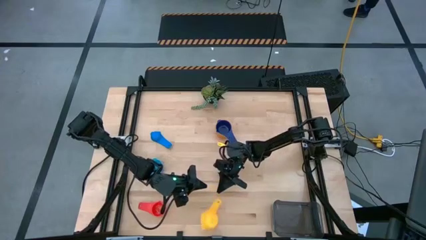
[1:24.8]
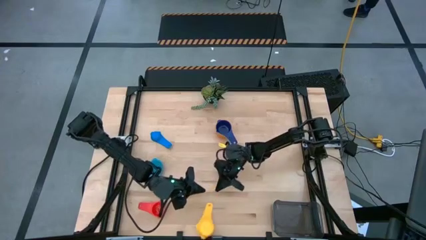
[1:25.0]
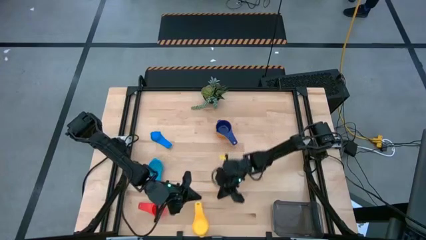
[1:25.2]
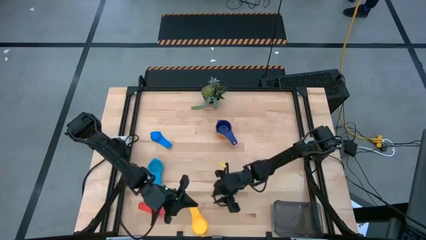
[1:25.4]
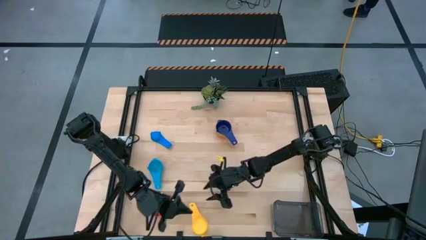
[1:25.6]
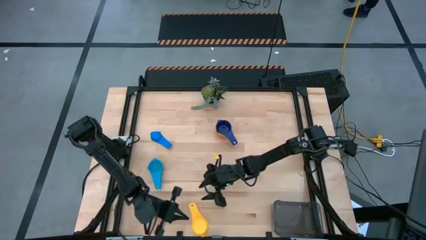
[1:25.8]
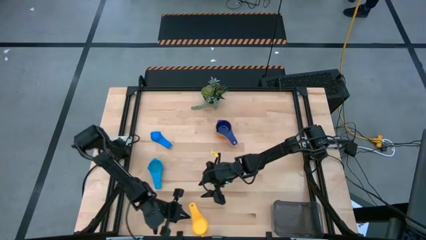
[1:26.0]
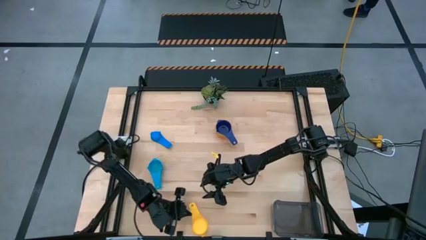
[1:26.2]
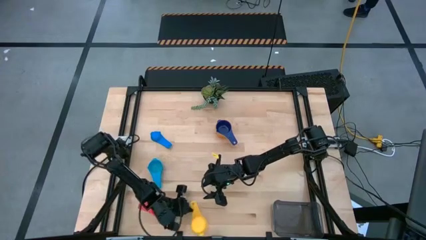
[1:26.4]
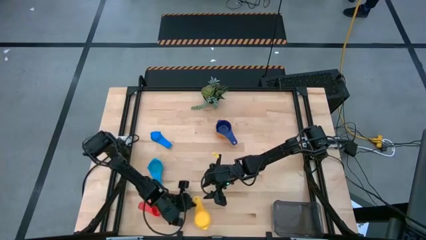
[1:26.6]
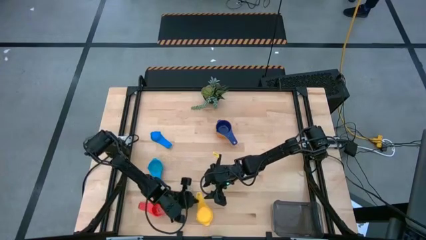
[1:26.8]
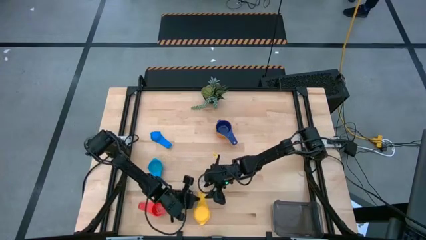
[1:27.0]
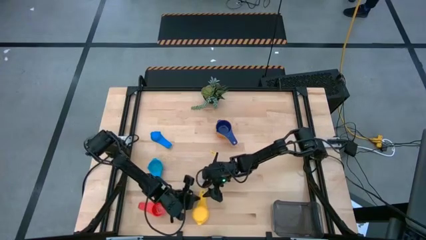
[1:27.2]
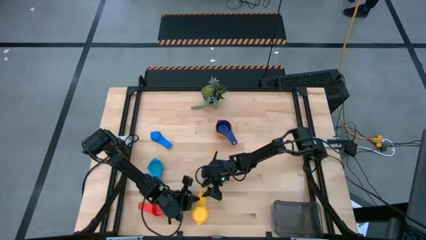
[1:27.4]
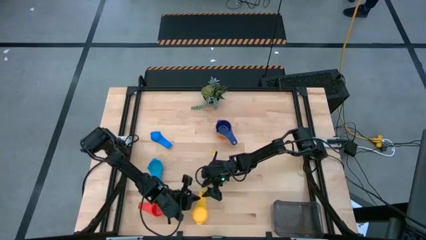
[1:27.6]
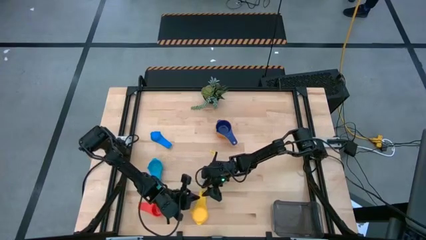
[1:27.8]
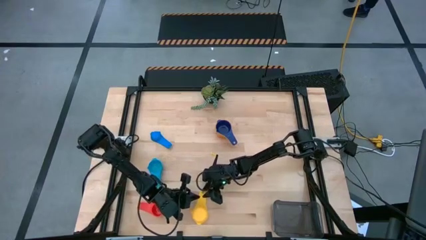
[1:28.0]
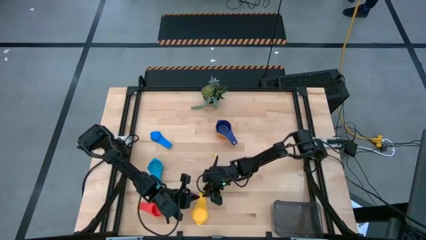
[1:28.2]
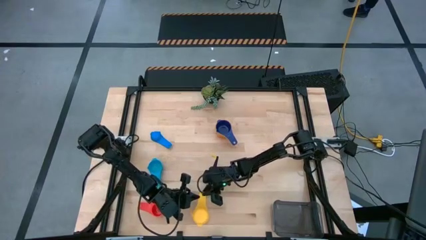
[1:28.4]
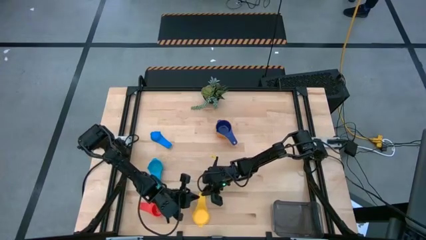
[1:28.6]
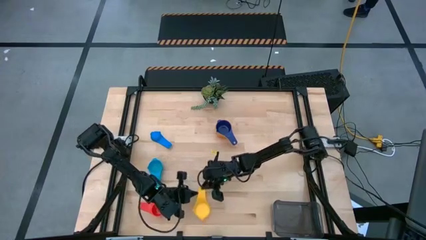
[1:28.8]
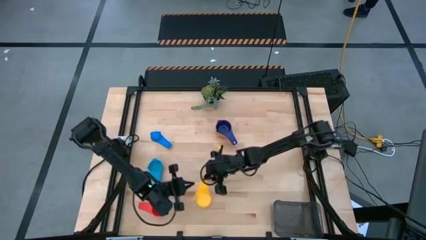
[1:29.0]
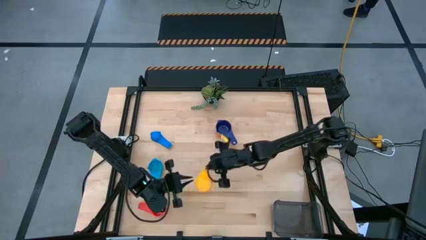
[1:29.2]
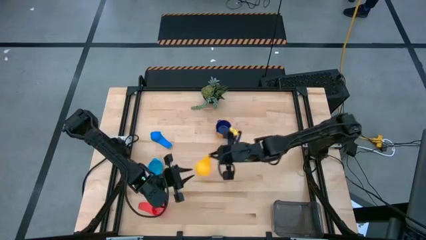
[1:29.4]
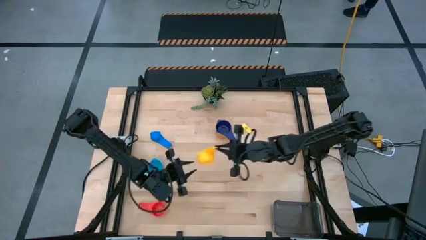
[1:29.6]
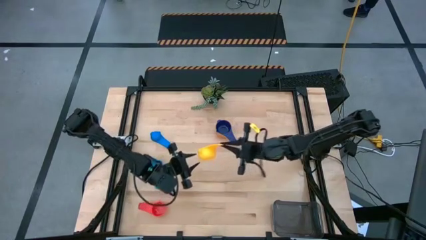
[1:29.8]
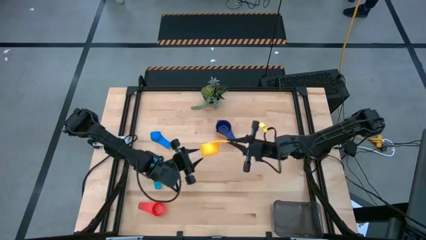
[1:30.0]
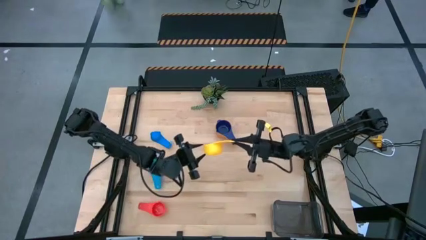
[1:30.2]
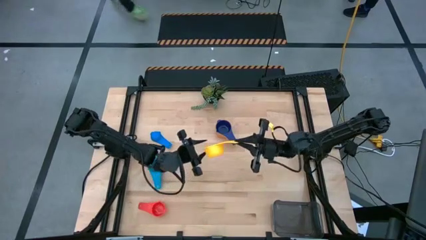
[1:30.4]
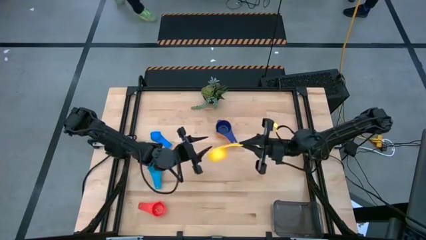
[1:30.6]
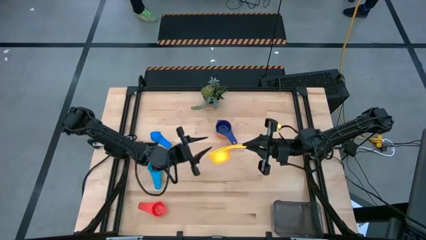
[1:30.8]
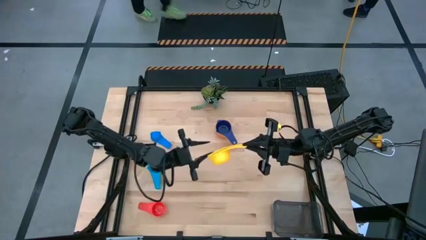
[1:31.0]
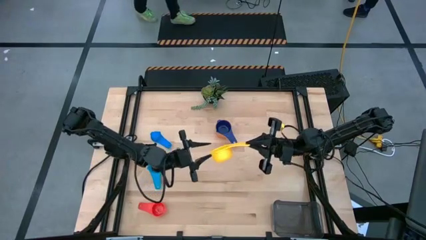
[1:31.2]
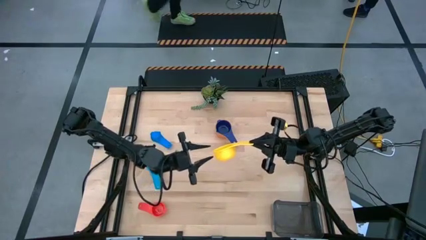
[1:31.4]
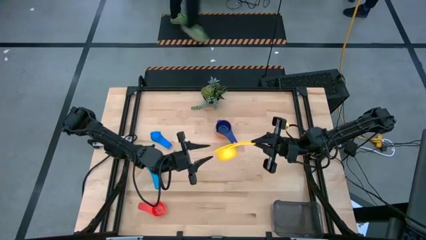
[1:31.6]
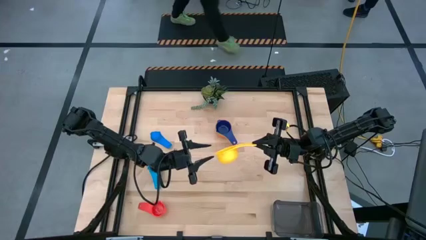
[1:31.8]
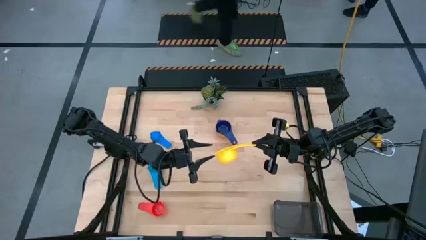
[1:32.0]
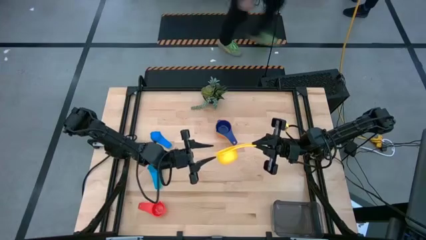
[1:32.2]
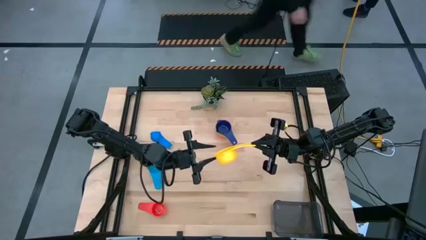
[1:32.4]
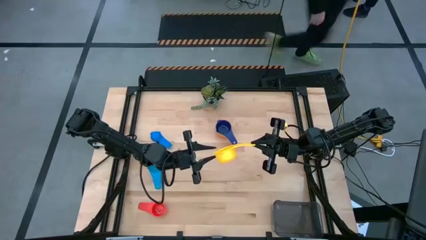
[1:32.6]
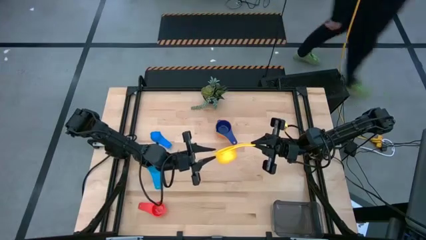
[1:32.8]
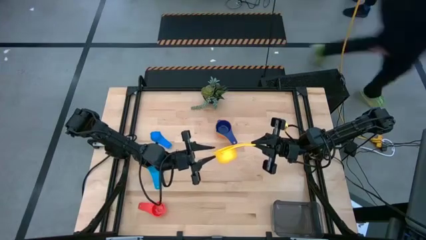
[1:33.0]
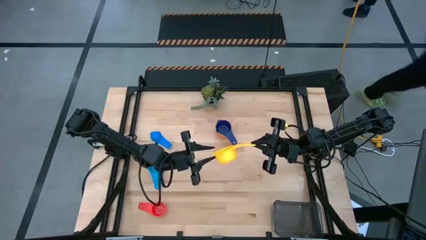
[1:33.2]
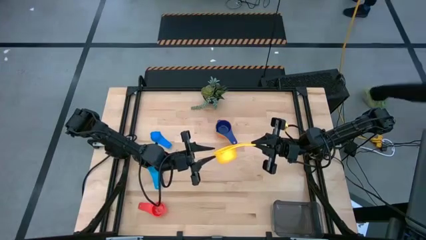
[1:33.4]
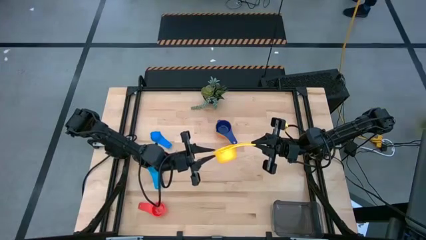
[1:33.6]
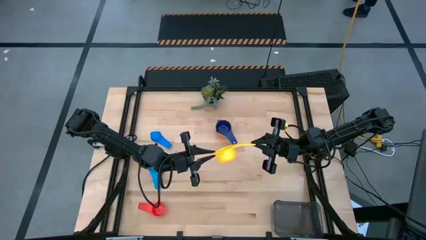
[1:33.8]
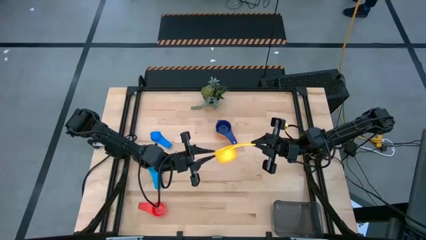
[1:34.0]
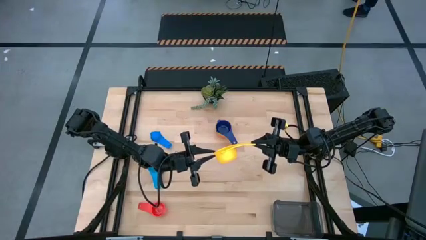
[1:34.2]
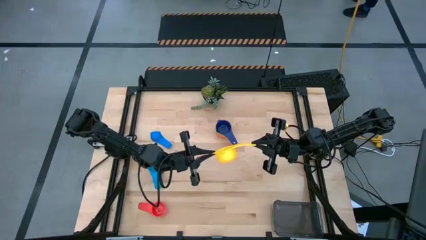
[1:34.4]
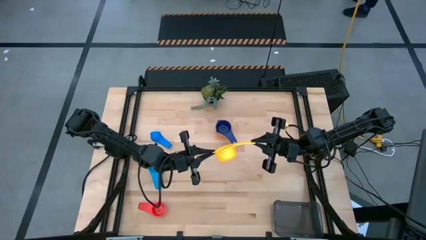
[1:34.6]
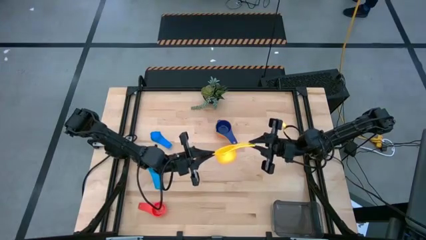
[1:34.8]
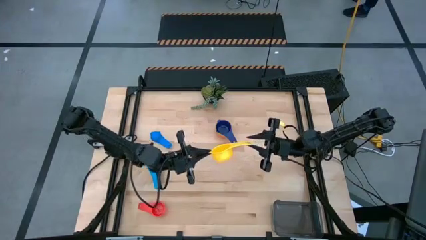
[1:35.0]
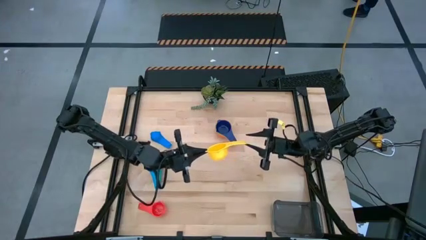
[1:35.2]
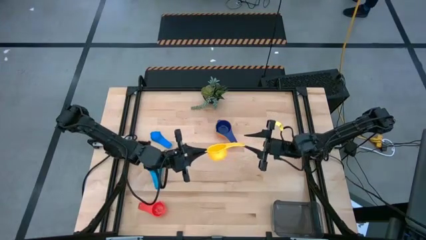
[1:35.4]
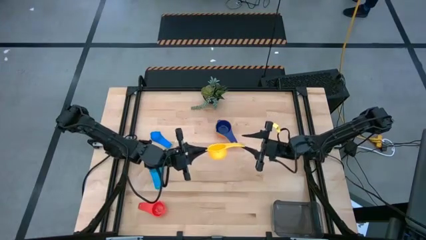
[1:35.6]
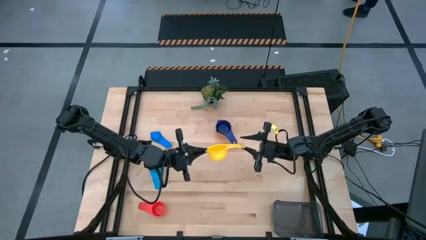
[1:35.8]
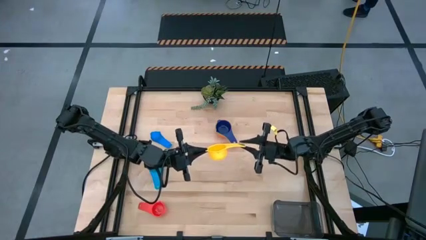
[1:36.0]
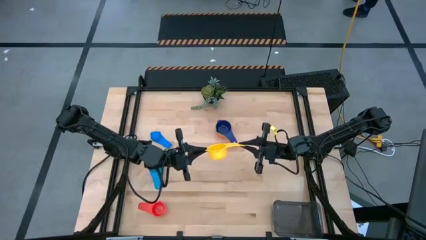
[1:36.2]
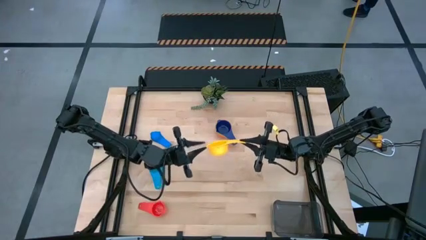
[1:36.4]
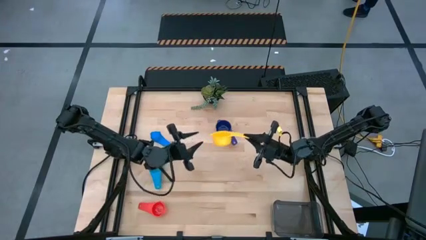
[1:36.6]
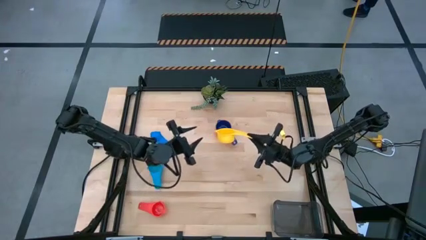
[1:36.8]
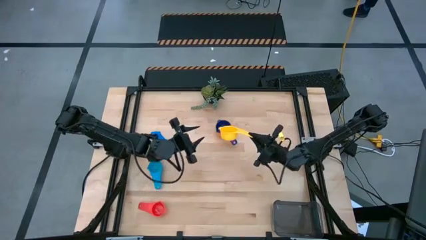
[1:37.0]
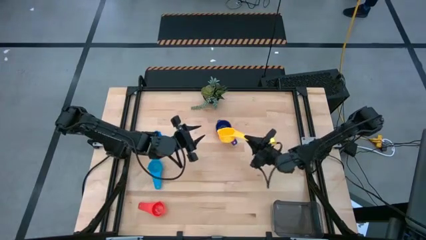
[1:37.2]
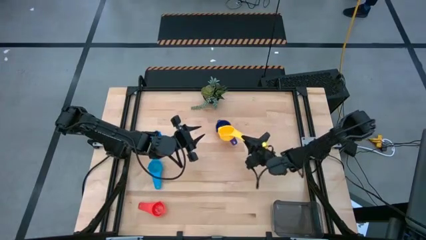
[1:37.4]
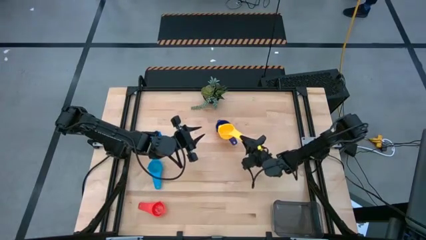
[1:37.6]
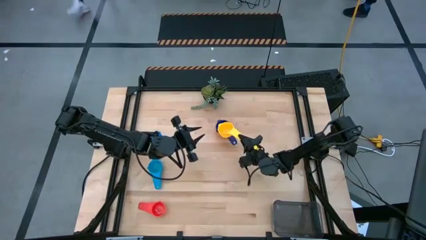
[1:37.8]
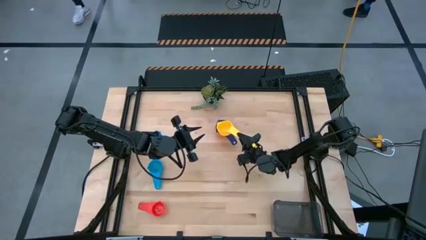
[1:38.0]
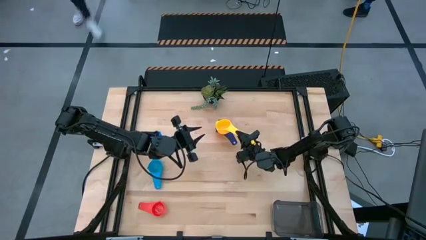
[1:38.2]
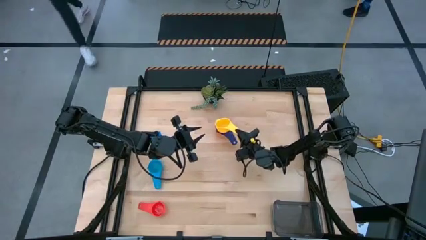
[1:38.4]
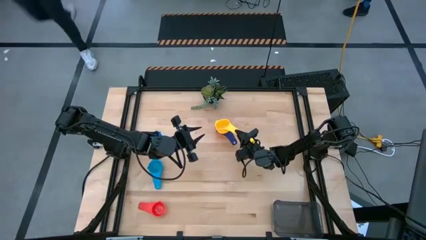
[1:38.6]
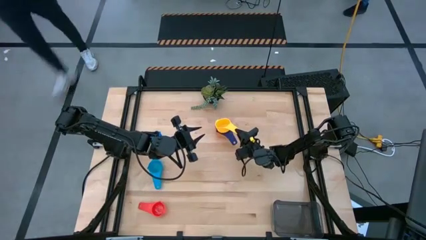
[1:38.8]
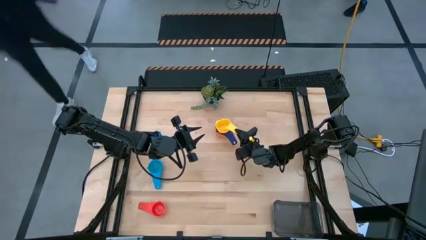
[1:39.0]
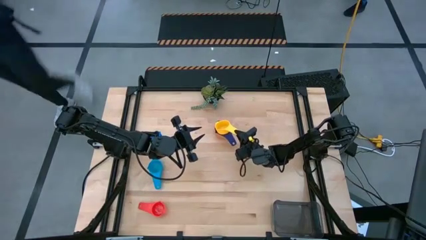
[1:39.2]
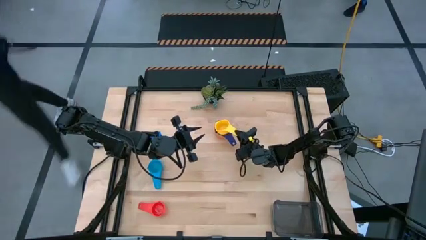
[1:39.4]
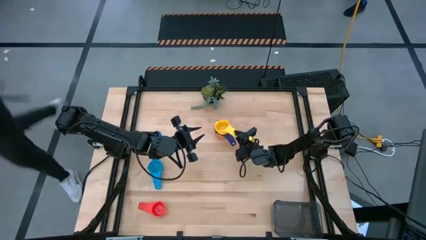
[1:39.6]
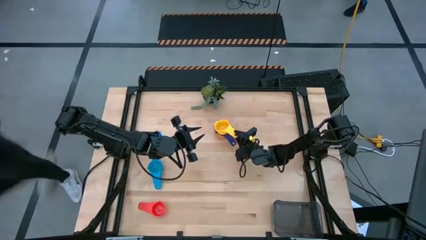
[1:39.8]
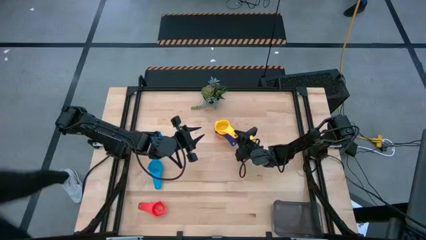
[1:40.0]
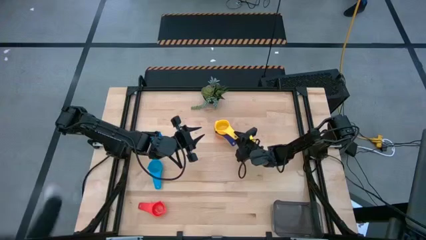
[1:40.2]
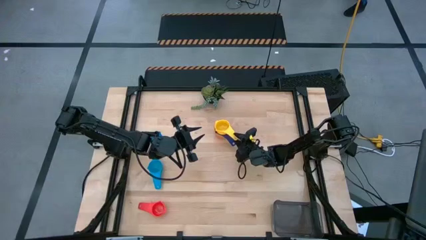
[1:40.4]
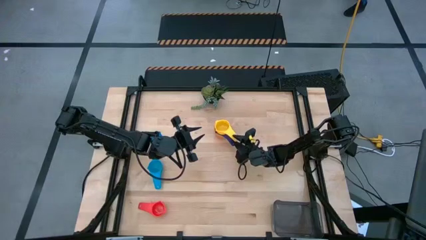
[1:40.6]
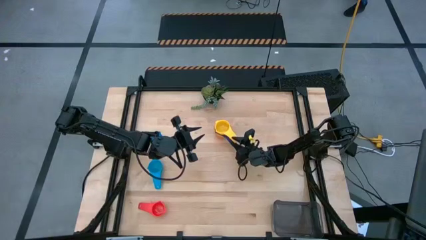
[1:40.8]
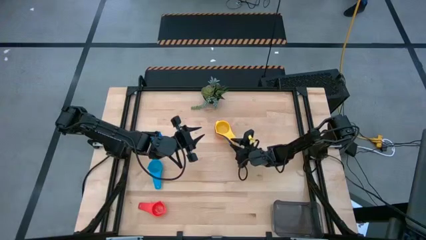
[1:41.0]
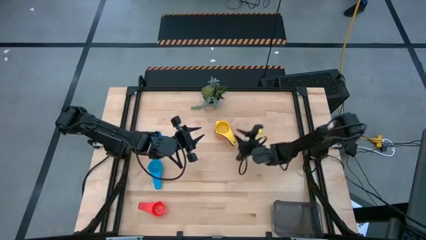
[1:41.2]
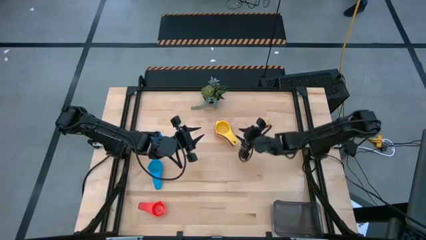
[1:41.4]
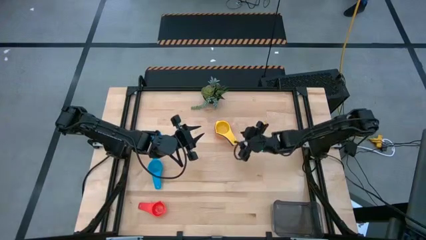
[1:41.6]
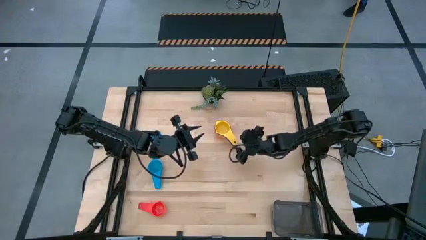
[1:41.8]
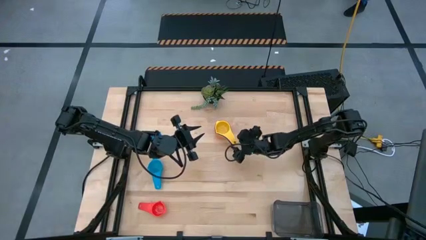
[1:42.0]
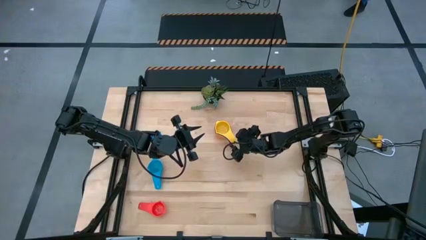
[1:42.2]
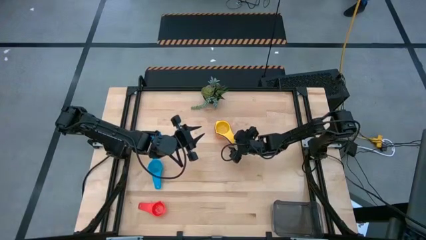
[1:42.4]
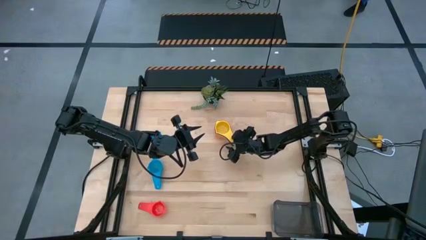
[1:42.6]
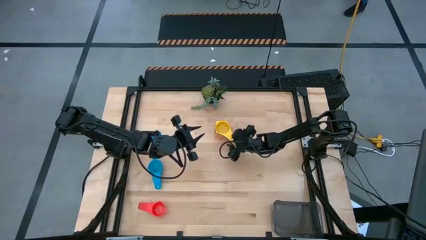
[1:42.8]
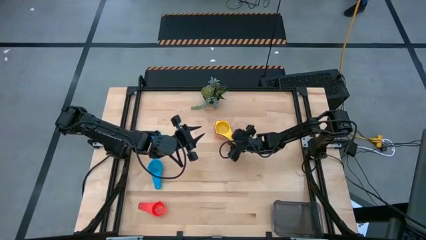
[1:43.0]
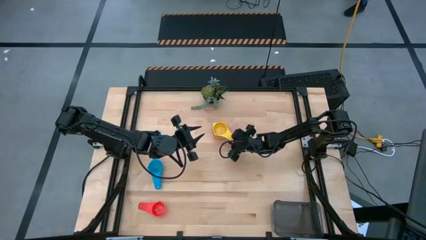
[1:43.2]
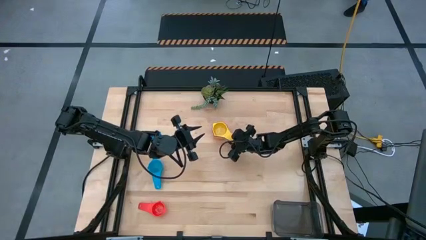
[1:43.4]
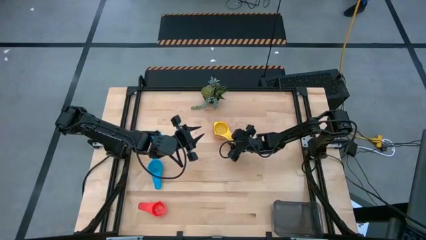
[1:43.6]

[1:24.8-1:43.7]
Task: Nest measuring cups in basket
Stack the yellow measuring cups on top of the violet measuring cups
